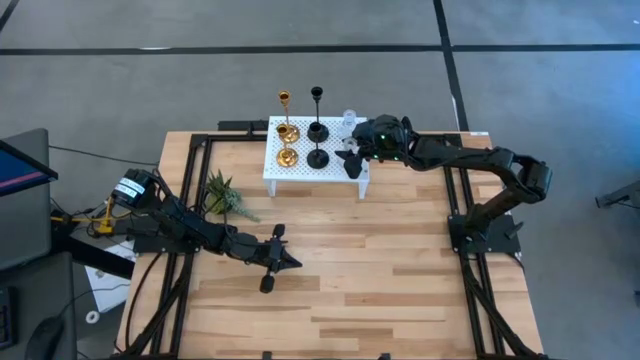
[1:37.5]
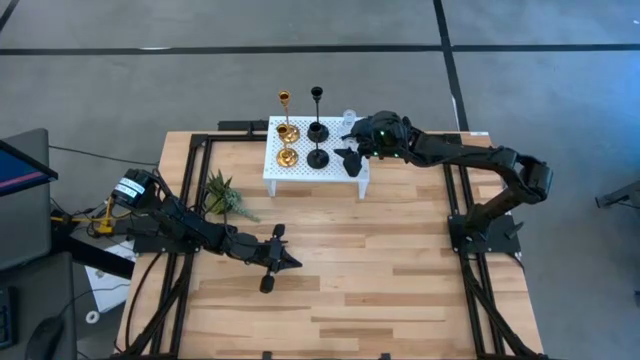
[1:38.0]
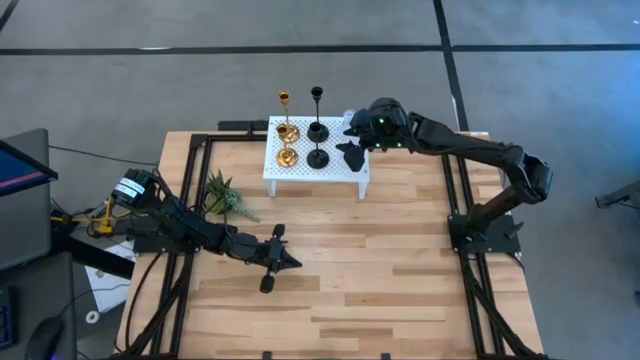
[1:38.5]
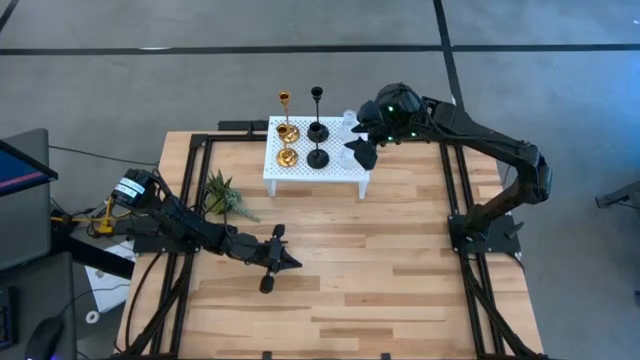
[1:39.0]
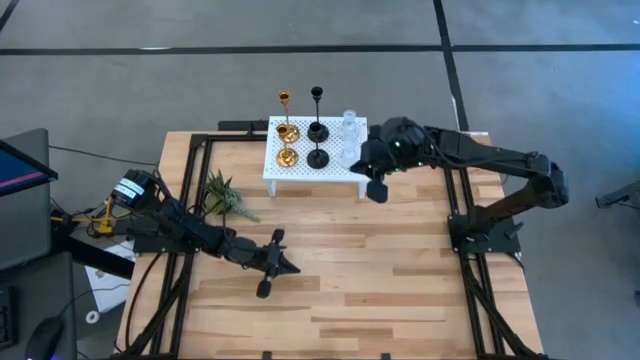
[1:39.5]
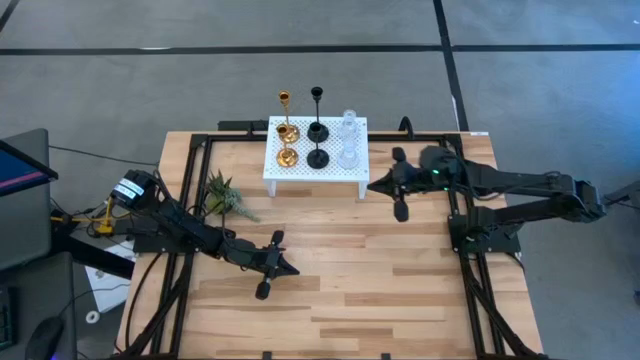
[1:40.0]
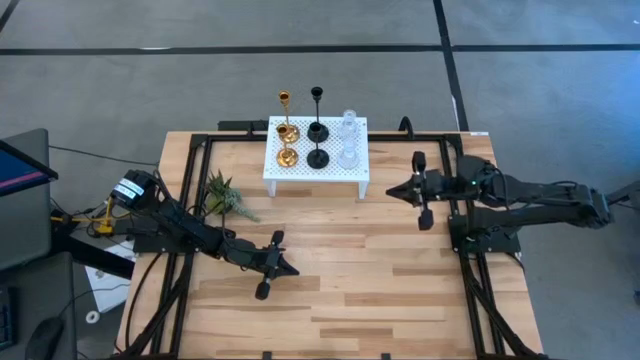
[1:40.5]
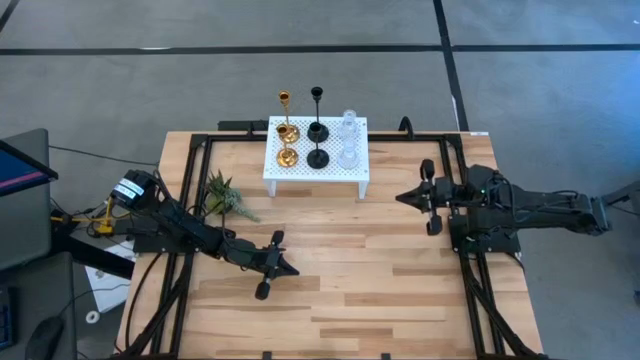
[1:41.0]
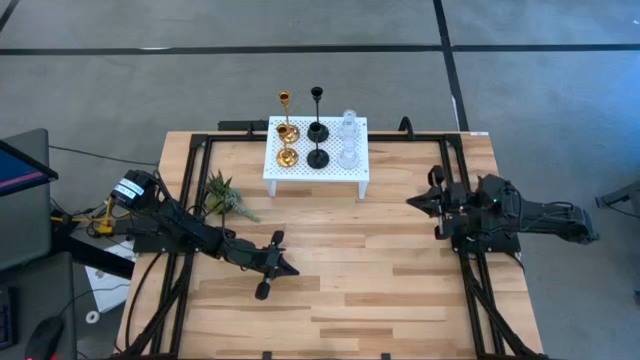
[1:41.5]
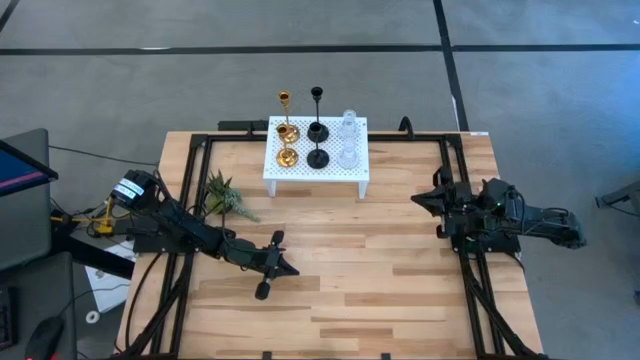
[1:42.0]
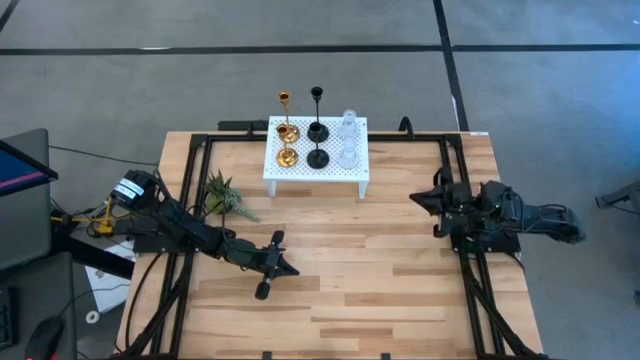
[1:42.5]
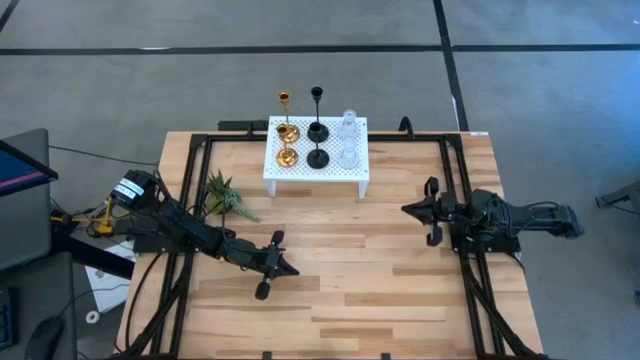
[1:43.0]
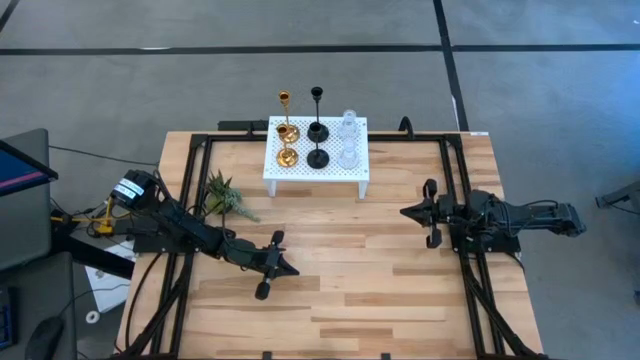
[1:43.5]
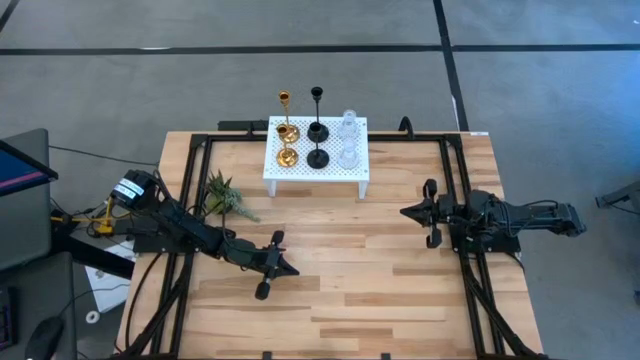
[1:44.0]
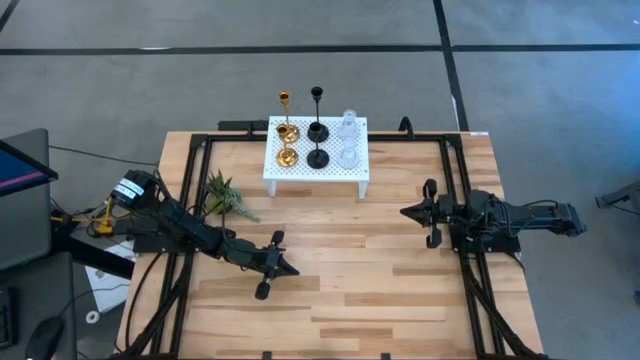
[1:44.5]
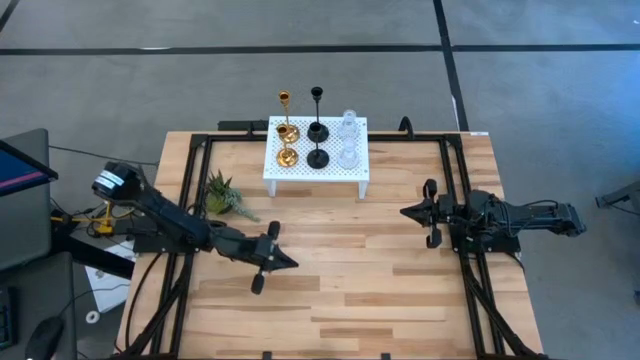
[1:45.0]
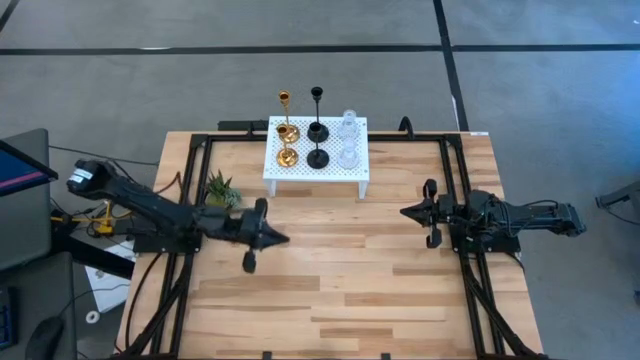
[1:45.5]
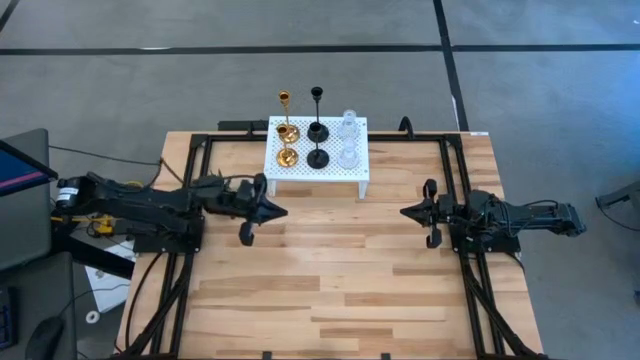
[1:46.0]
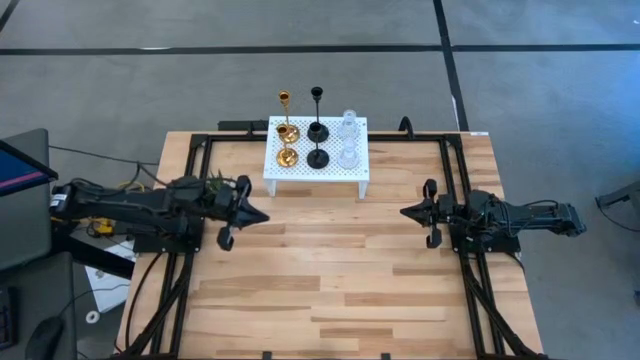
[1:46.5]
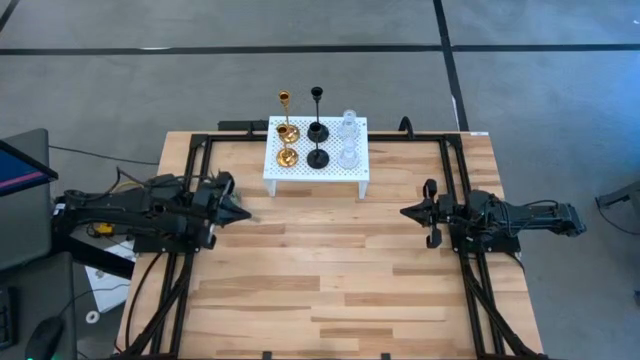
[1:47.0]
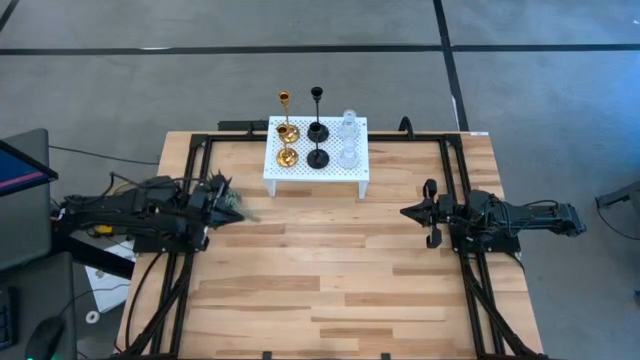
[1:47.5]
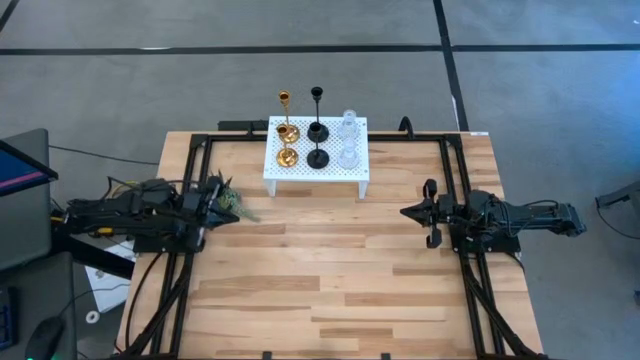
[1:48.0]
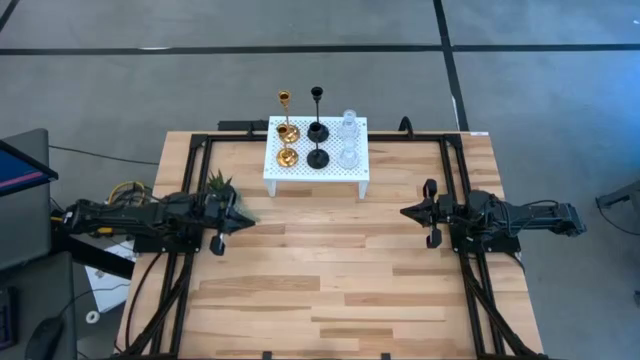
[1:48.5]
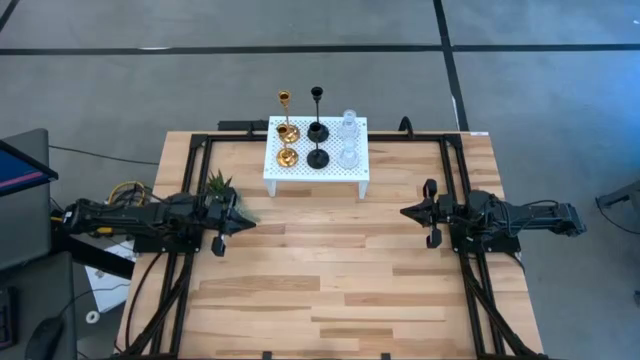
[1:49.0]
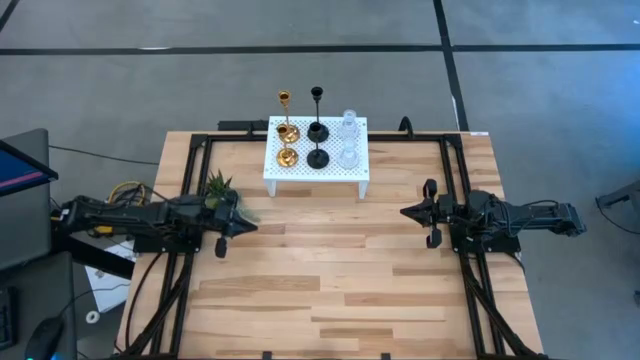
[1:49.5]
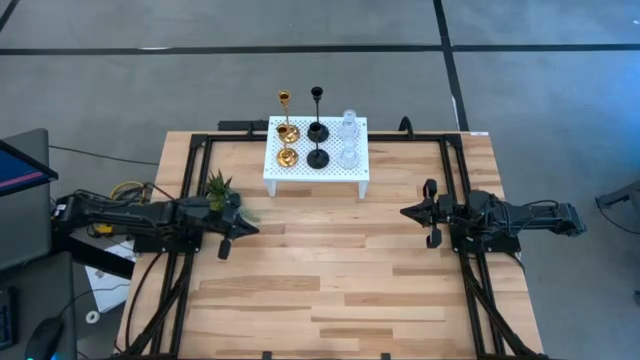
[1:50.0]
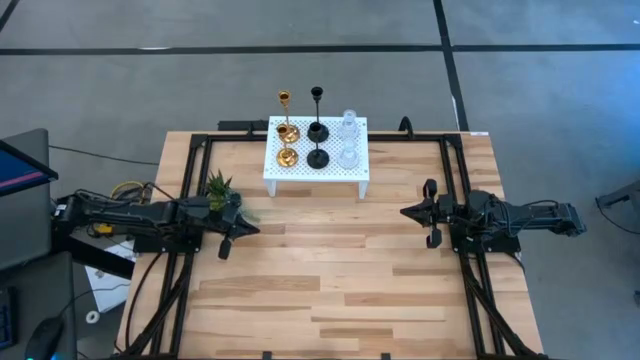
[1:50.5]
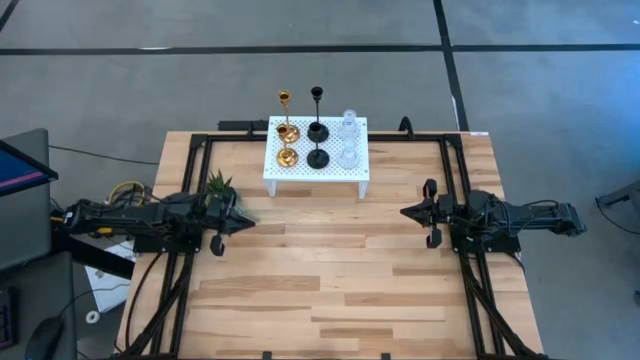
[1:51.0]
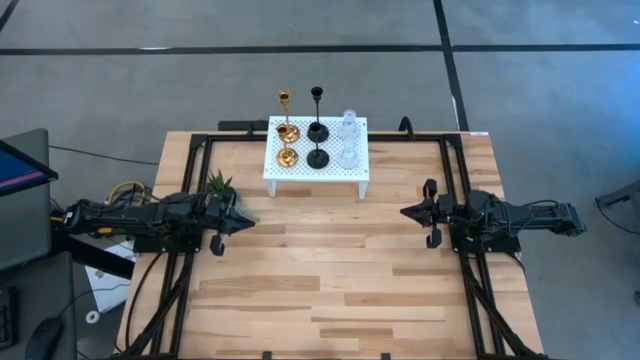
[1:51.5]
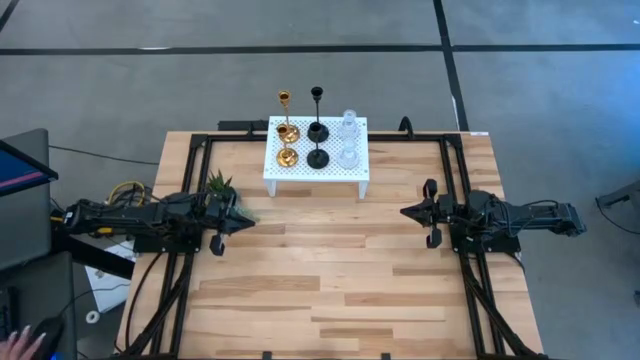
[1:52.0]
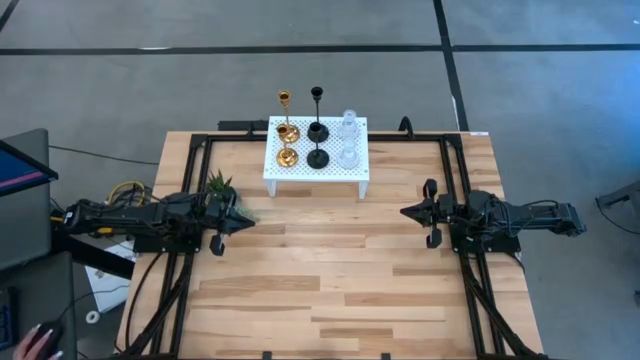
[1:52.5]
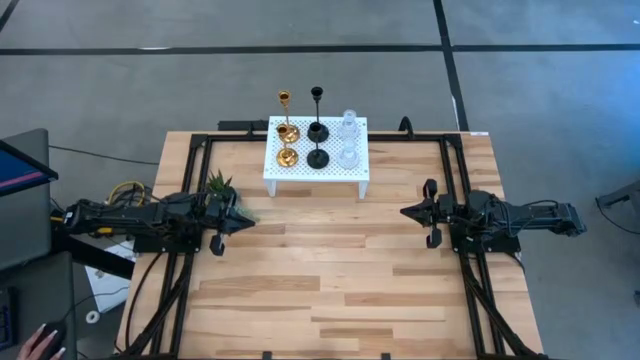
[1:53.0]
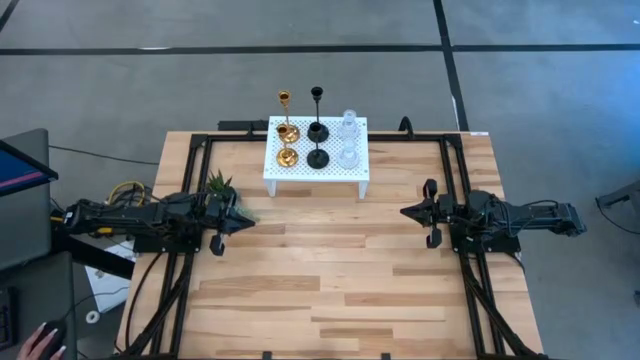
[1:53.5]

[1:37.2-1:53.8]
Task: Pick & Place candle stick holders
Return to Home Position

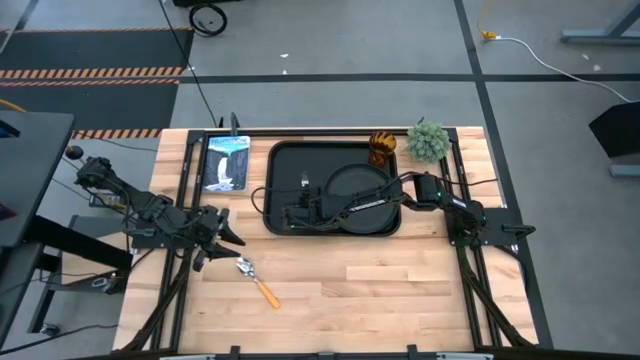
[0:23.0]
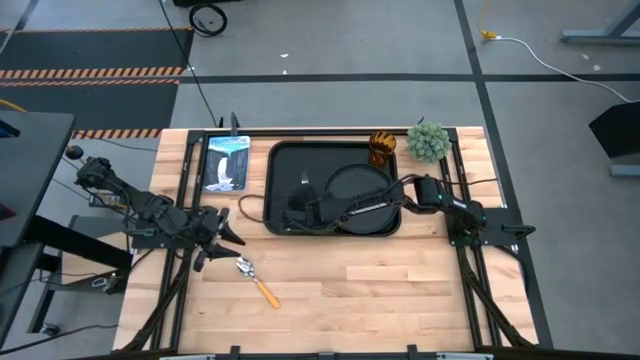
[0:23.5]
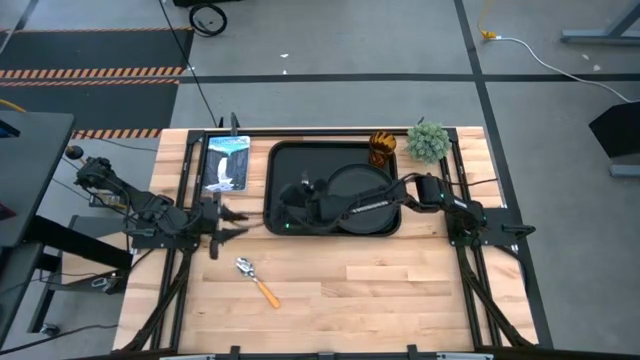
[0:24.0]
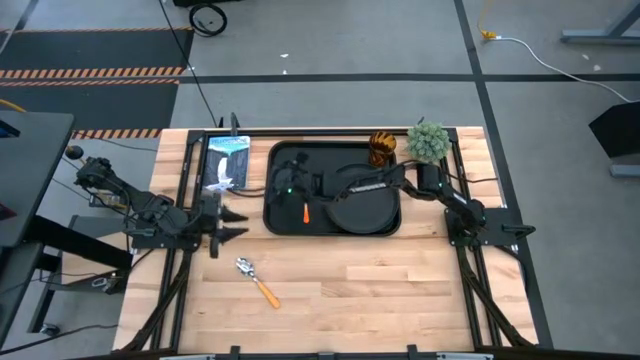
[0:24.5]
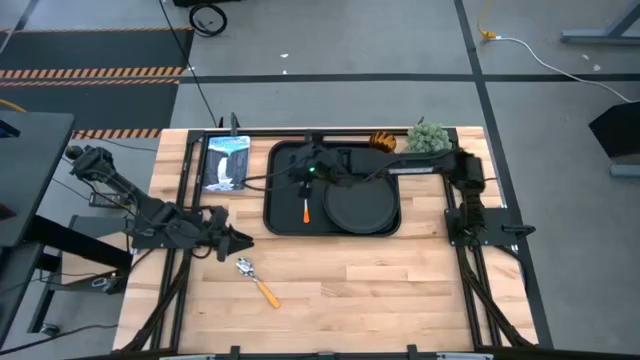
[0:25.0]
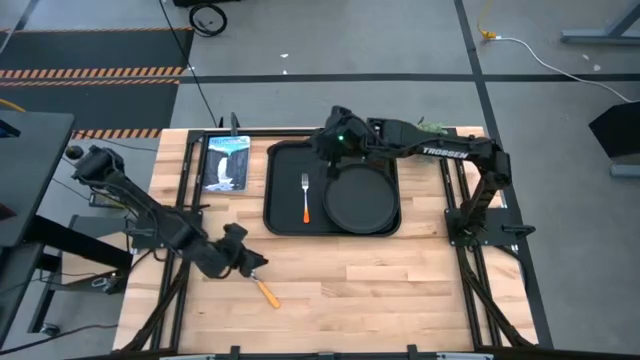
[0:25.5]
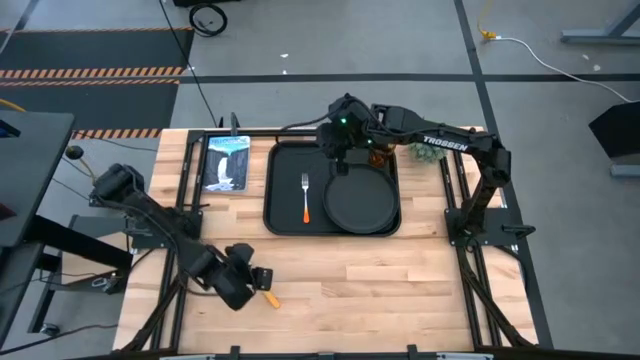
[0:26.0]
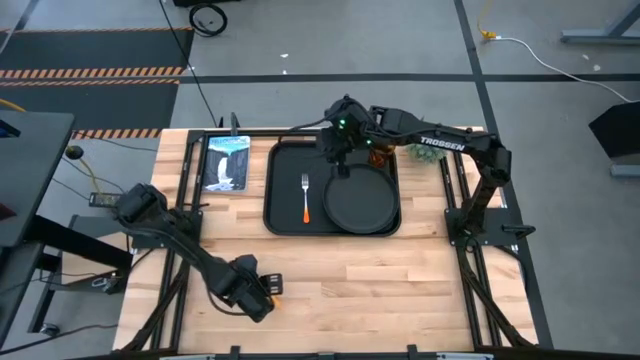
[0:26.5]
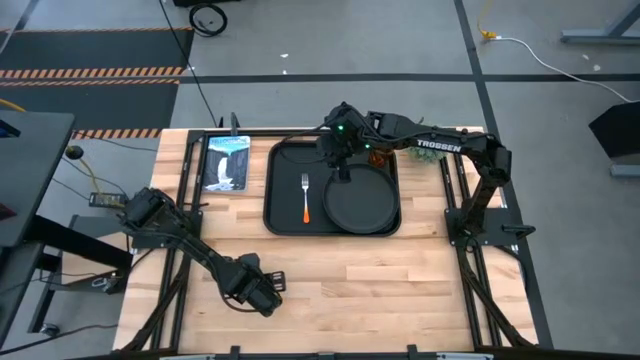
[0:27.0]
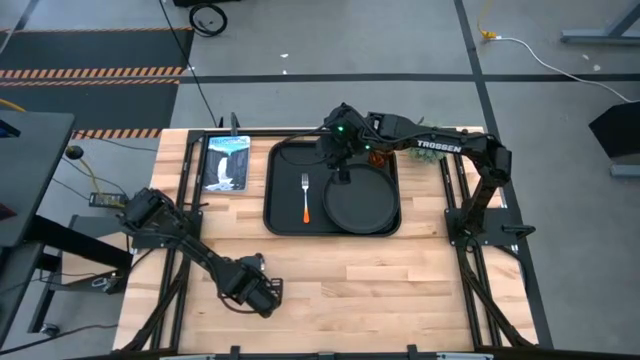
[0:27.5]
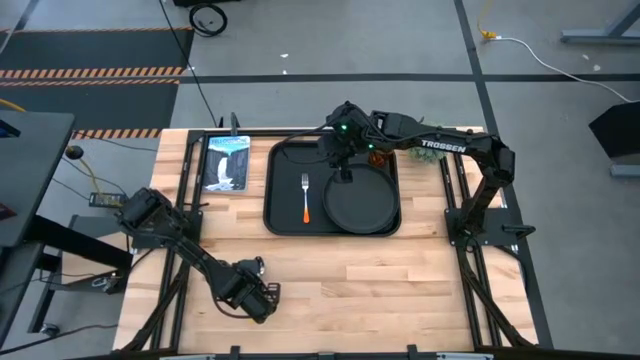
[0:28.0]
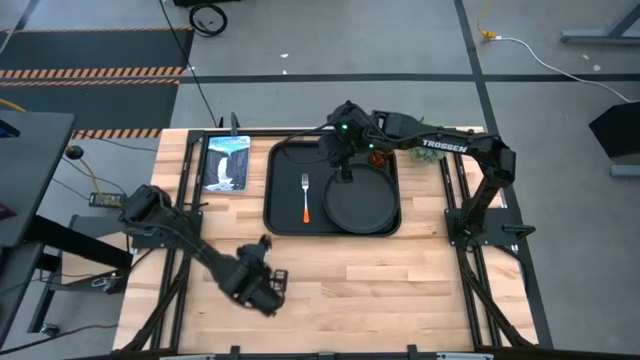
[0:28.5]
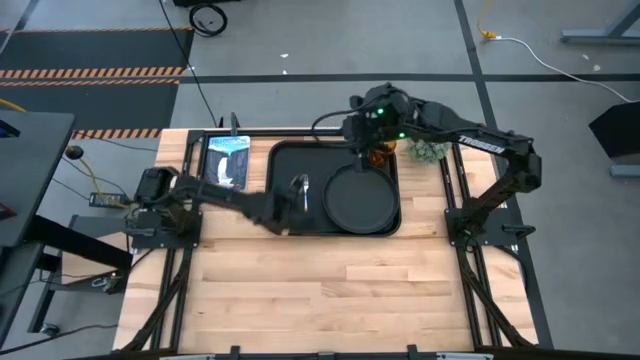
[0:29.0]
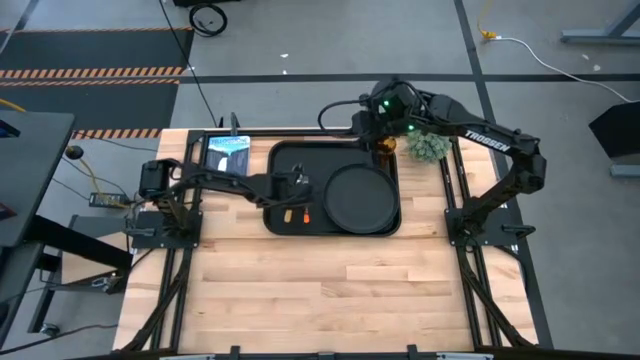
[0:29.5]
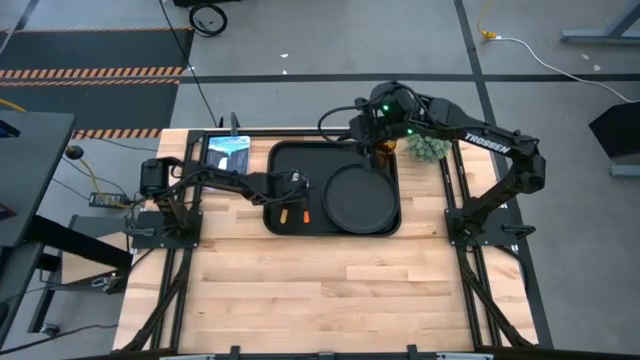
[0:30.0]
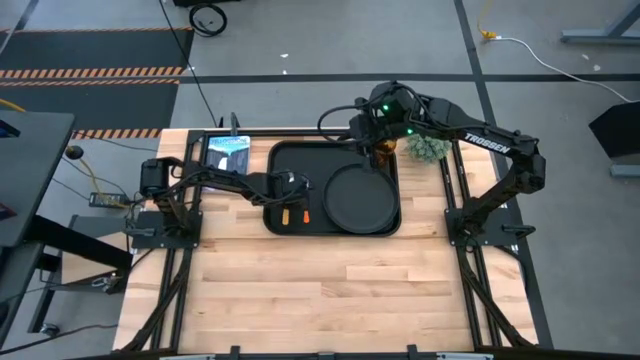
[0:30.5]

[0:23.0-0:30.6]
Task: Pick and place plate/cup/fork/spoon on tray
Put the yellow spoon on the black serving tray to the right of the orange fork
